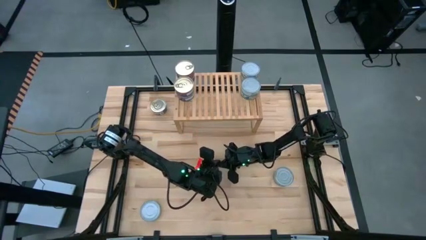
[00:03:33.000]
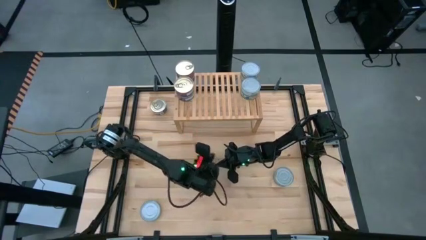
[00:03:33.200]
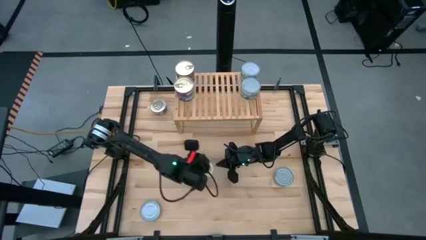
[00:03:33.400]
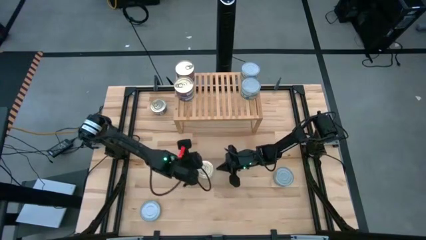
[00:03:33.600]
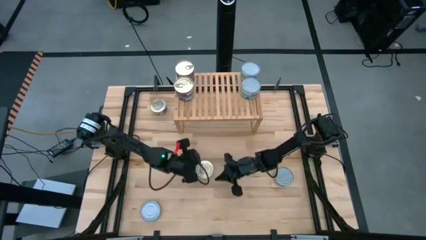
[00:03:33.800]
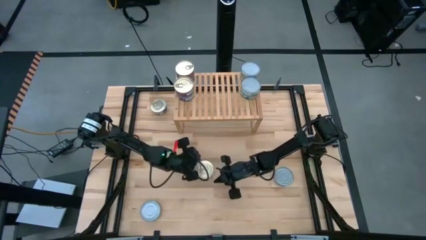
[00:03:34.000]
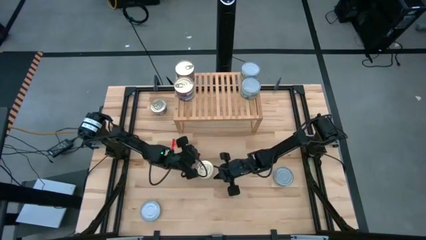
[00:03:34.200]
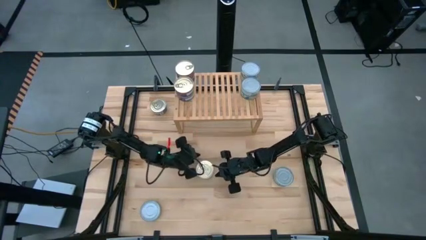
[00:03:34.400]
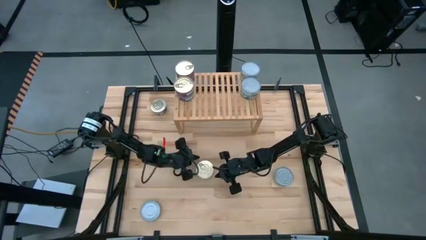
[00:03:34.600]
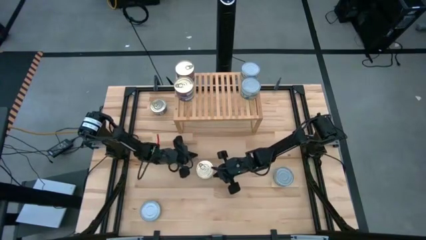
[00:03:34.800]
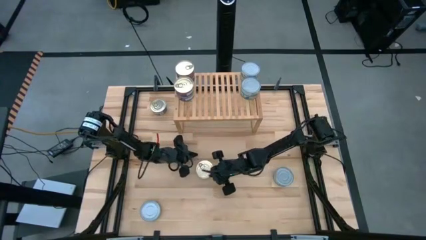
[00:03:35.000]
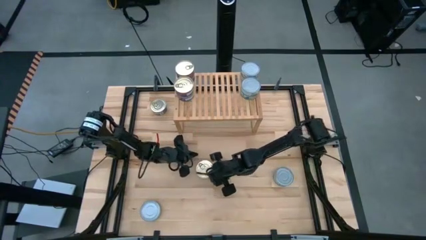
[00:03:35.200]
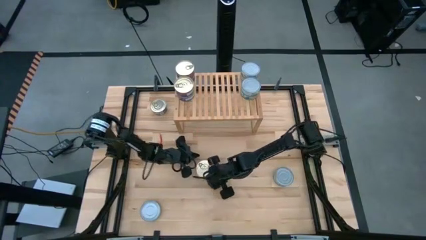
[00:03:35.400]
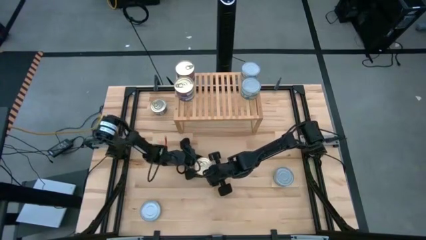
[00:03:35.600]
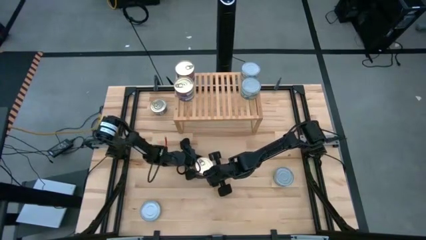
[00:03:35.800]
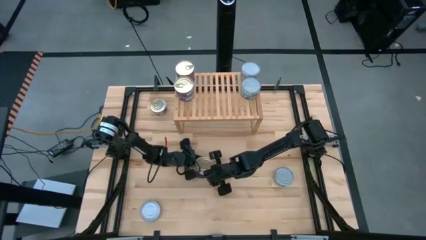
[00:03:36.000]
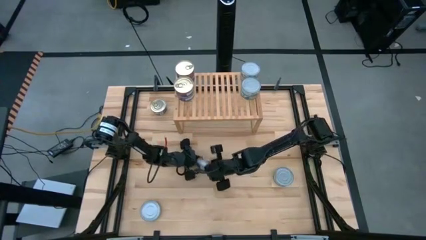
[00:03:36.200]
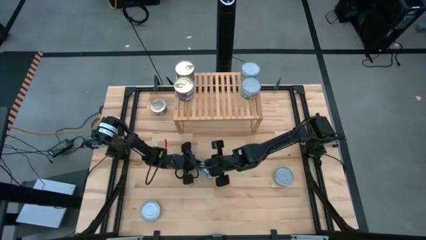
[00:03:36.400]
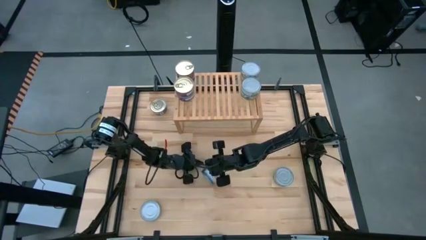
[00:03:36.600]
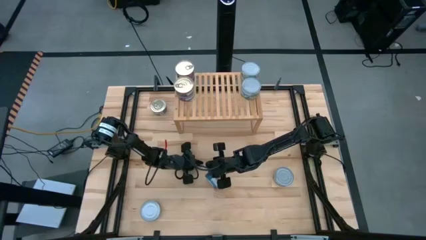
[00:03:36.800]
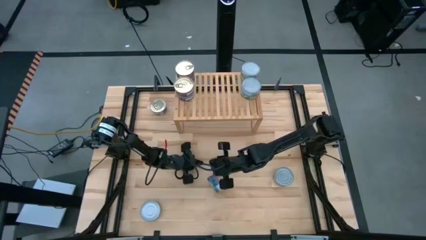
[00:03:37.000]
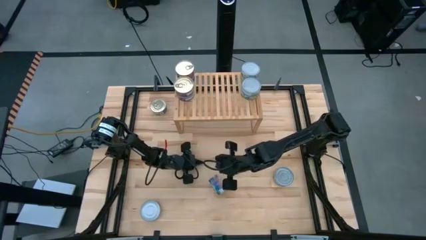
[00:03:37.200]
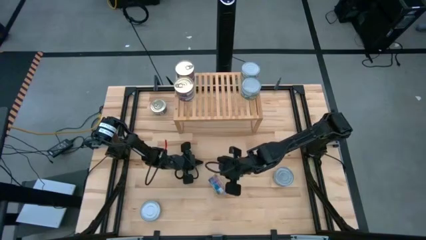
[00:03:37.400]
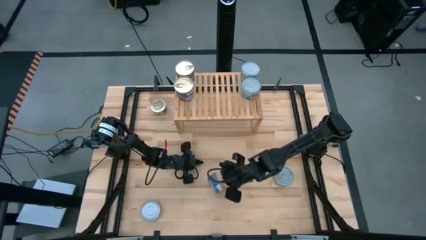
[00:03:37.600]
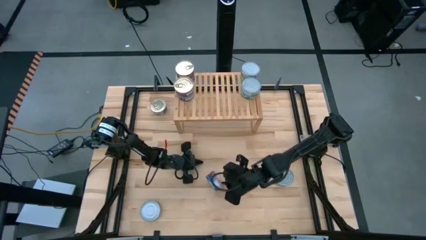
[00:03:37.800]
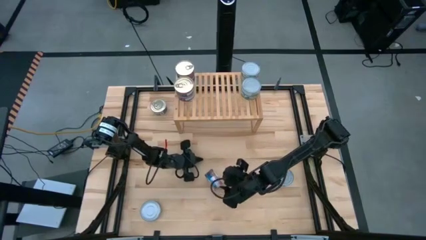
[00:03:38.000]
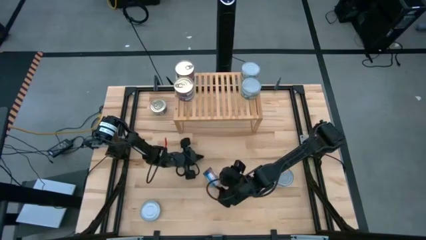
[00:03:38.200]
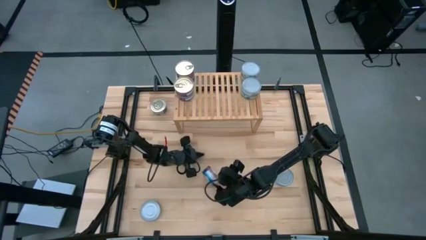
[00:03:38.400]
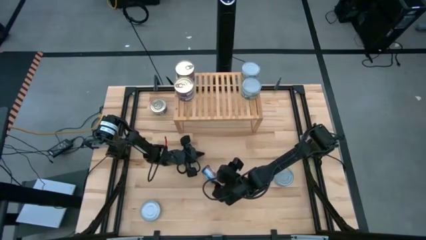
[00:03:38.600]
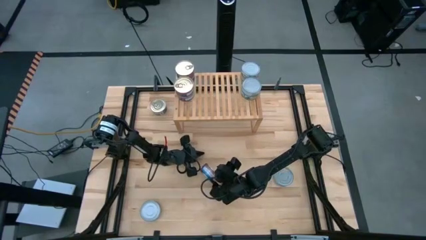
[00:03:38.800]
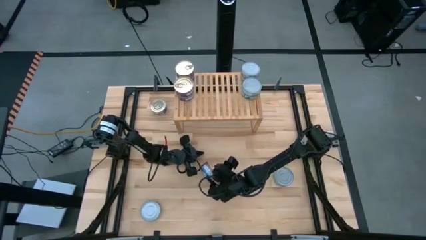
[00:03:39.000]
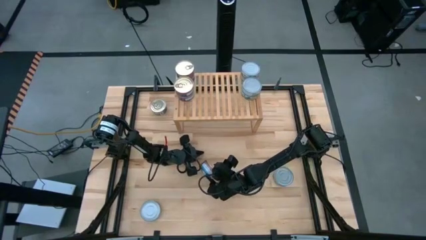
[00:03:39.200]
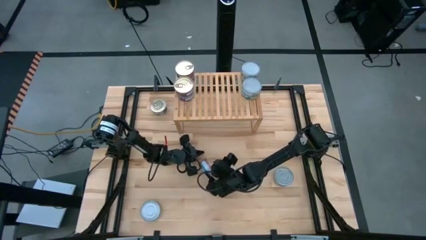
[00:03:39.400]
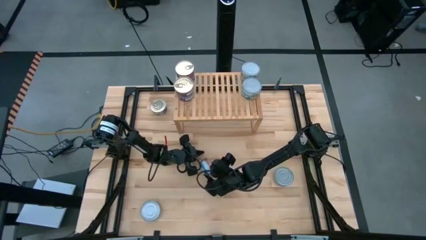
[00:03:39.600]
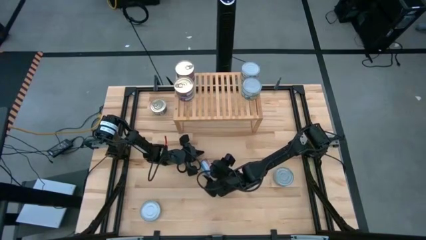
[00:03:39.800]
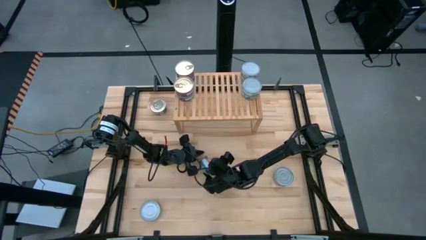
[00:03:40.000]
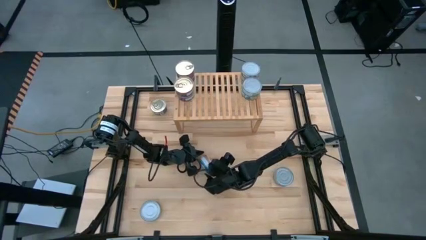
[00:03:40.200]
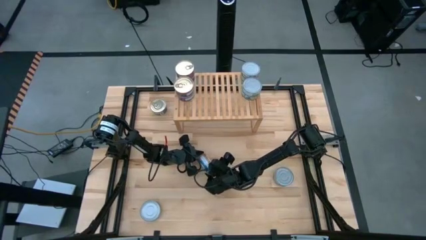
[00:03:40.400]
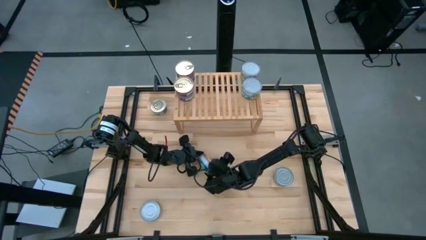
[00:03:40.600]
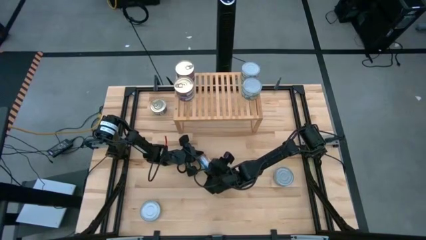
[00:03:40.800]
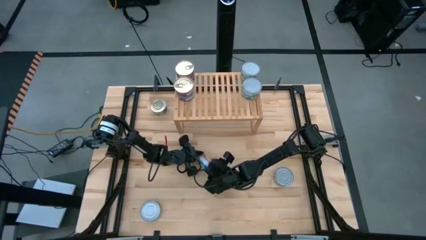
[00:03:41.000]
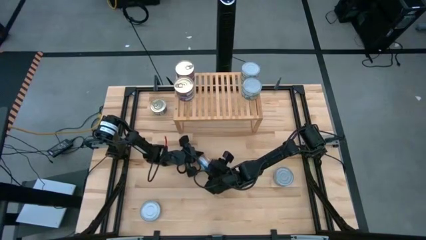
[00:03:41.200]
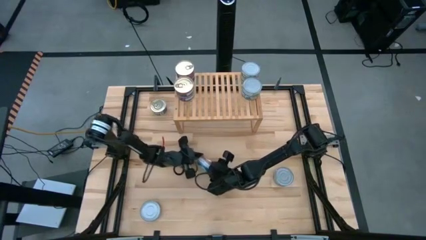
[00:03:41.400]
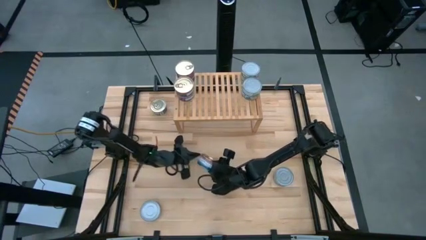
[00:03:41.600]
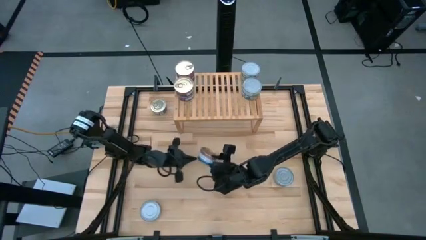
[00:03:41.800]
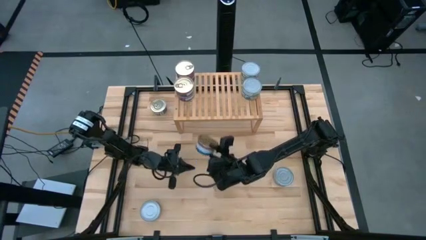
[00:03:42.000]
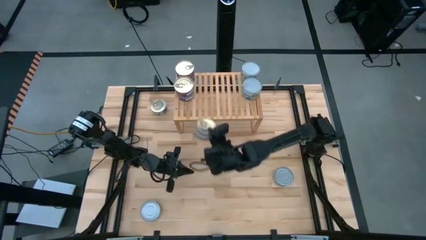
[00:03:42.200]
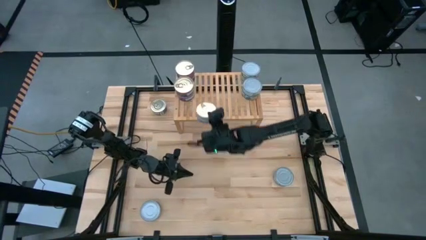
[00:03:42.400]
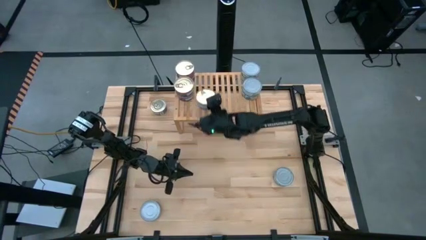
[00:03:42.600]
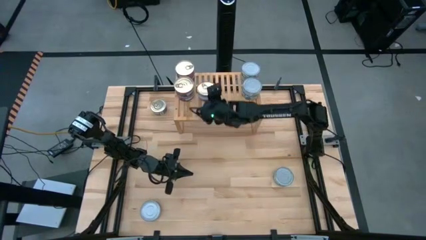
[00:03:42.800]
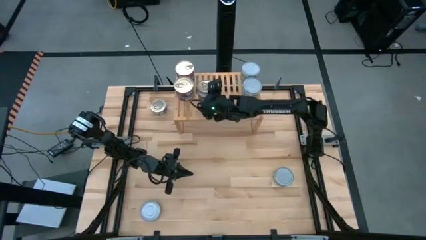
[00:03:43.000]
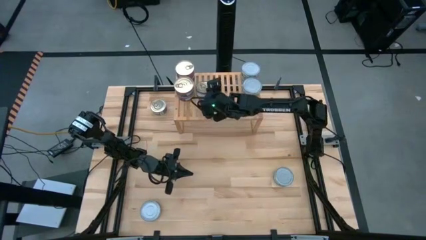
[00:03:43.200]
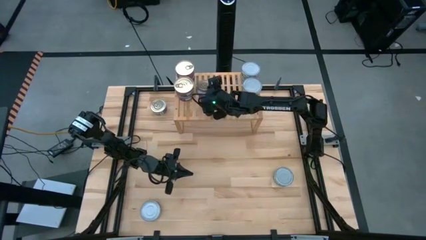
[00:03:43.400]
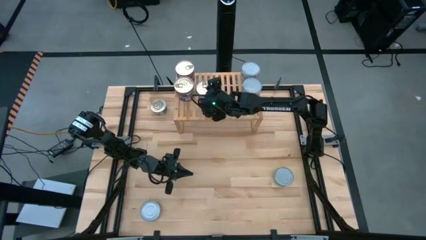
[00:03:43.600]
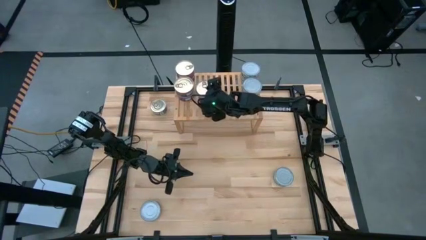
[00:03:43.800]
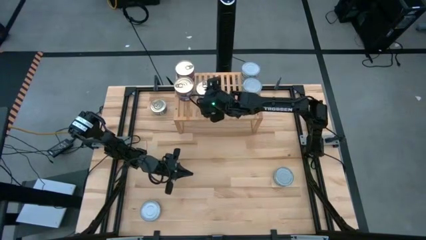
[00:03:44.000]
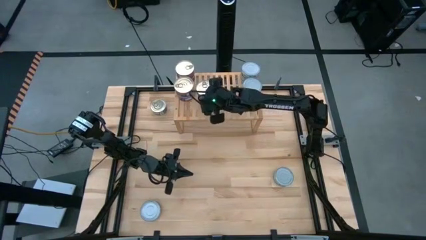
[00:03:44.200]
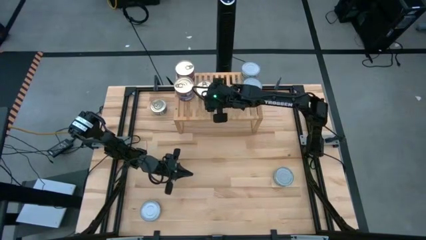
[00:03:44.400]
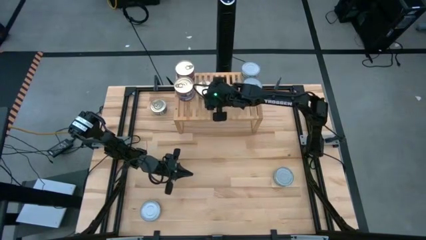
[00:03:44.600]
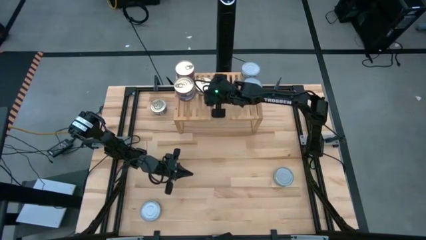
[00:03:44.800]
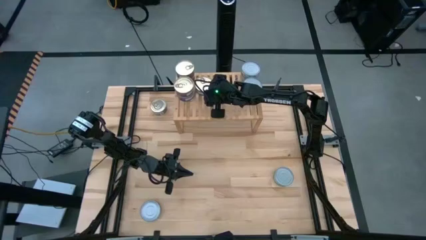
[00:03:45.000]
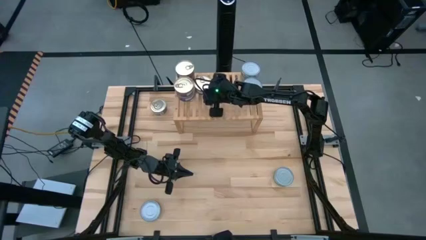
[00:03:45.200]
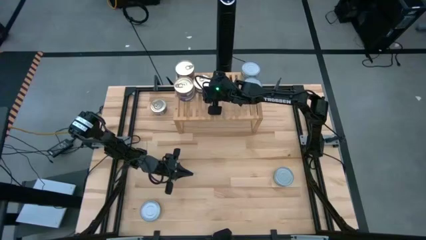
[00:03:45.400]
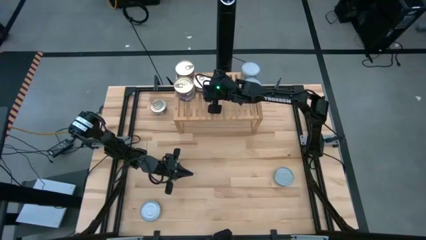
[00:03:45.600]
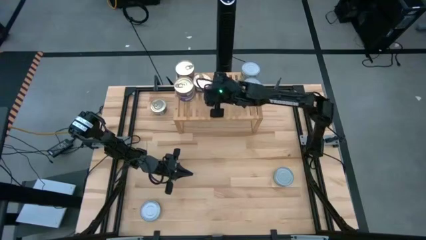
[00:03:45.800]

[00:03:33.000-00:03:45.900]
Task: Stack canned seafood by type on shelf
Put the blue-pink tuna can on the shelf

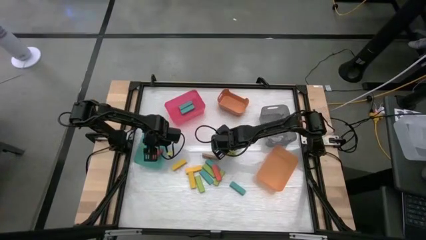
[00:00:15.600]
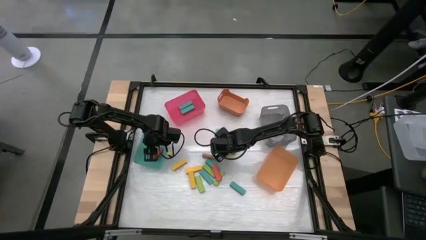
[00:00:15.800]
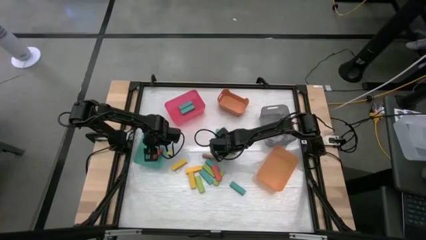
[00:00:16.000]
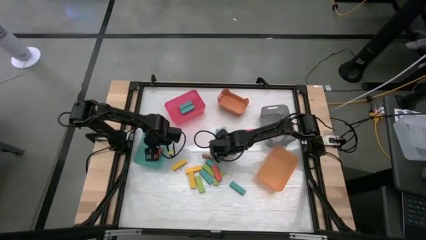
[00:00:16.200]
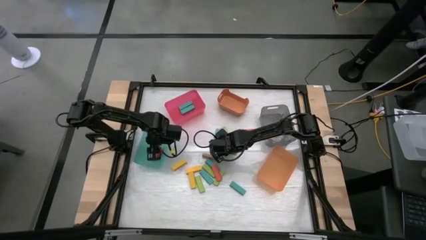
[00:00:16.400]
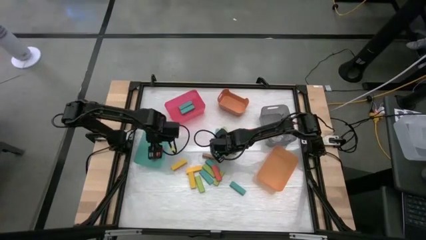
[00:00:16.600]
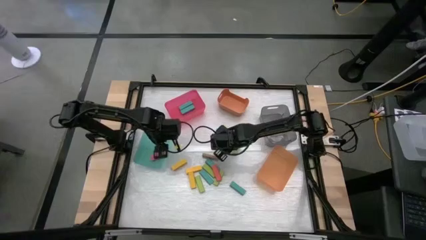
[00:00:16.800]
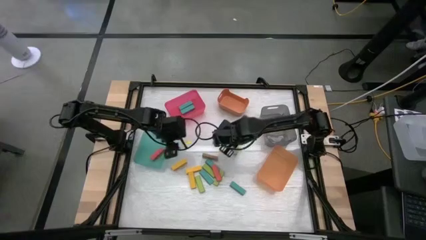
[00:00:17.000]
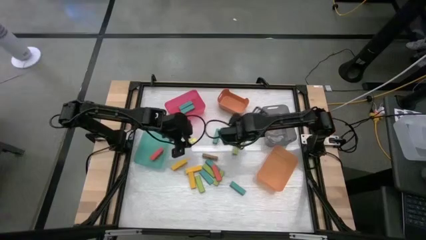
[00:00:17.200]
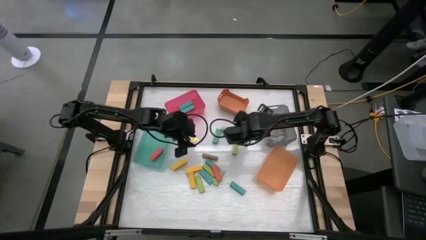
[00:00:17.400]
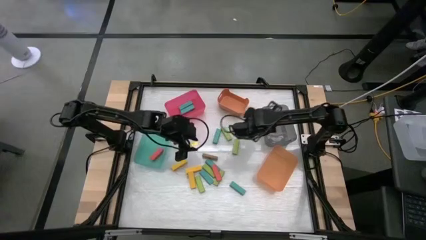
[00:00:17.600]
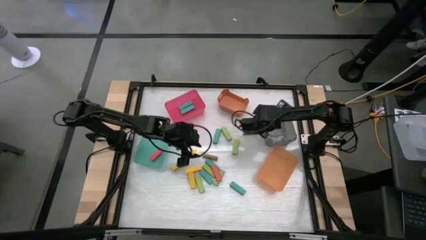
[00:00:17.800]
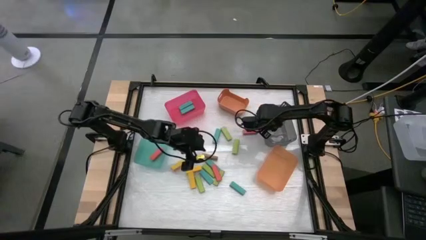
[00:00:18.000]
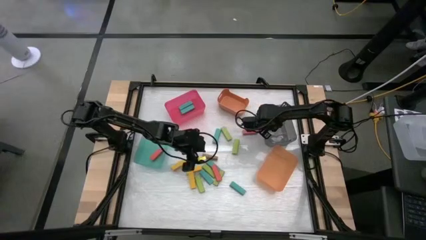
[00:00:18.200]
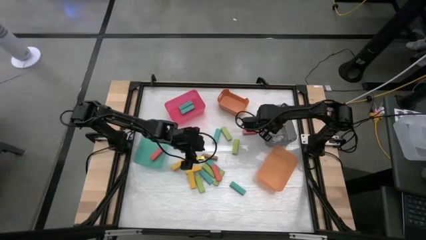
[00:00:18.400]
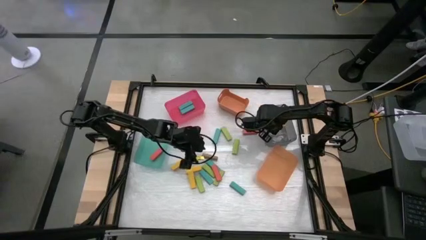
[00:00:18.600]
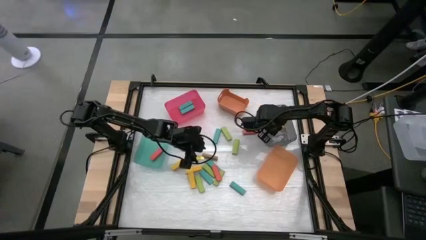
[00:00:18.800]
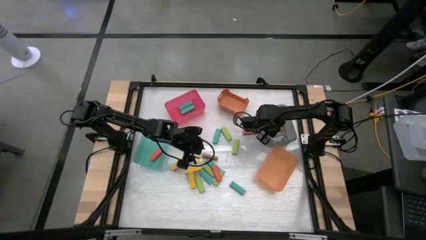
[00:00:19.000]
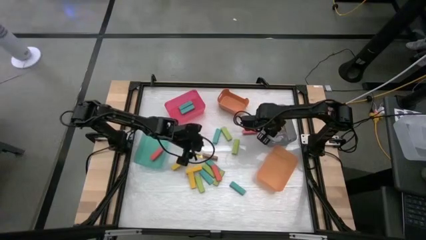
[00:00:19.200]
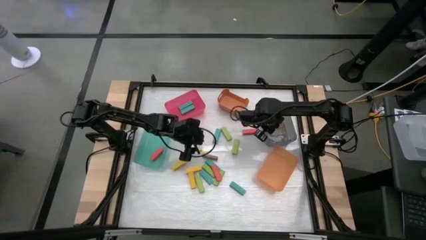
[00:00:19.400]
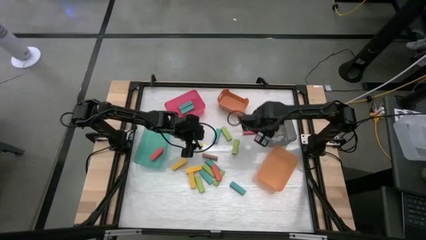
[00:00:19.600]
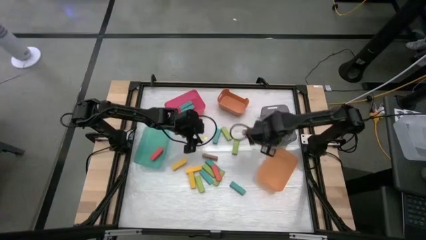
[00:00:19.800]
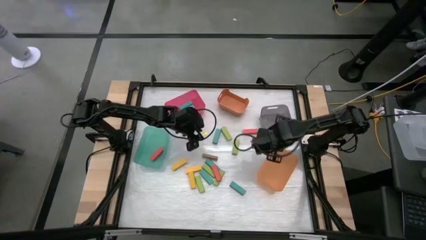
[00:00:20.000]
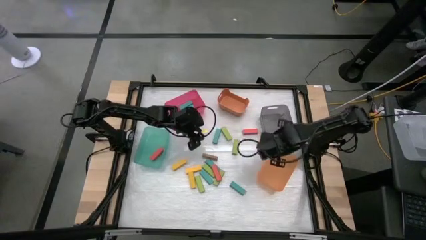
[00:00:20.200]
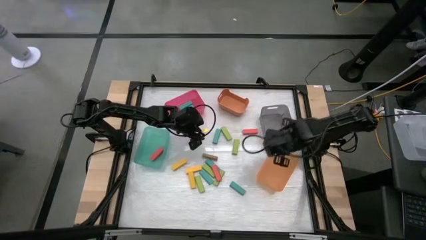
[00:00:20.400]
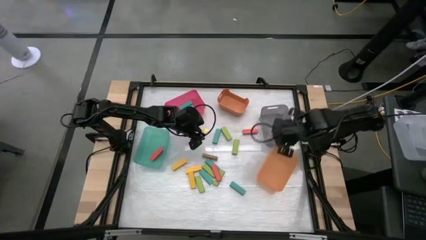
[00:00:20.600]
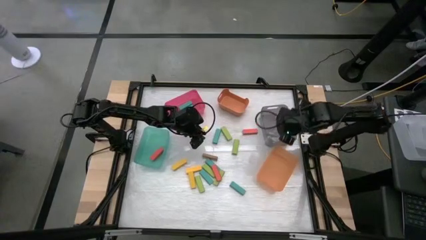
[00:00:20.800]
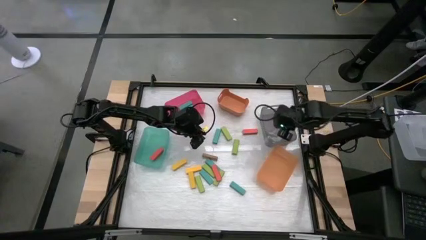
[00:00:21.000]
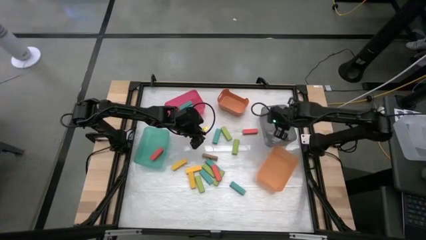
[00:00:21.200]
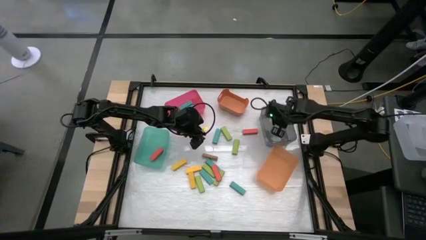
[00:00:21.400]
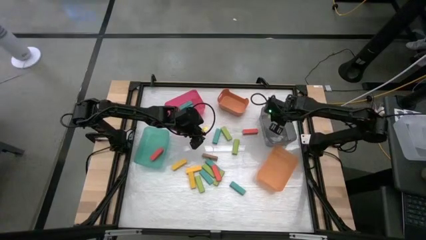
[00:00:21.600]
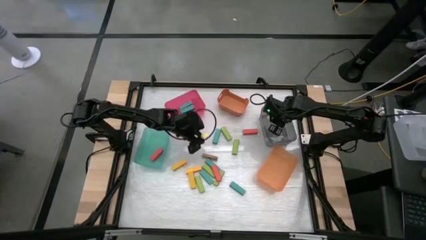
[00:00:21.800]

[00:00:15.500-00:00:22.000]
Task: Sort blocks
Put the yellow block into the gray bin
